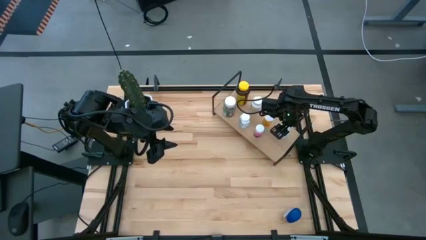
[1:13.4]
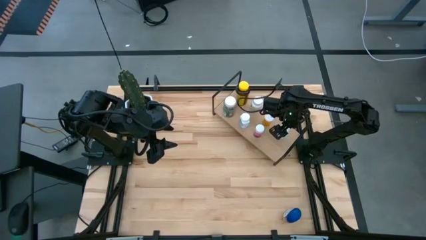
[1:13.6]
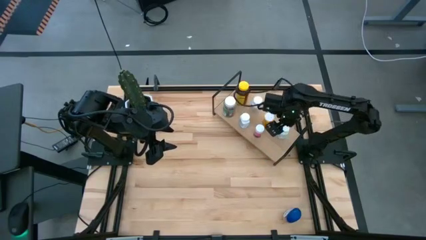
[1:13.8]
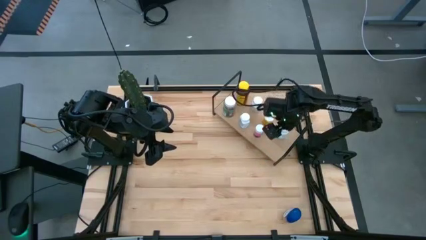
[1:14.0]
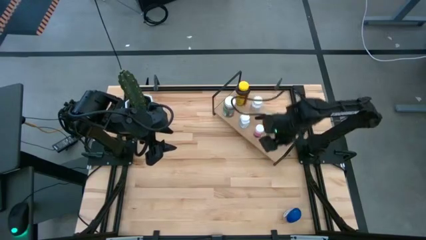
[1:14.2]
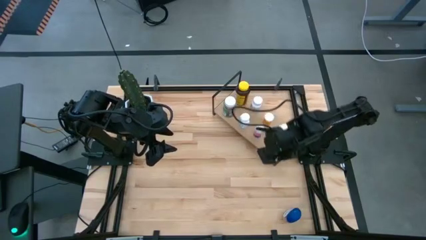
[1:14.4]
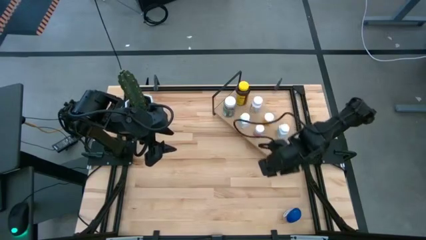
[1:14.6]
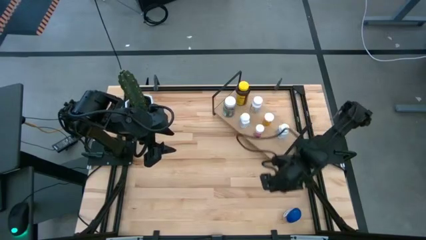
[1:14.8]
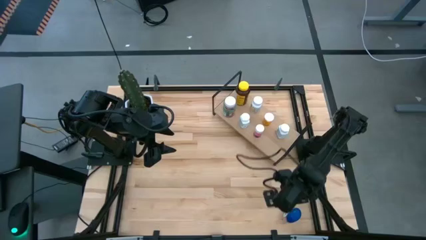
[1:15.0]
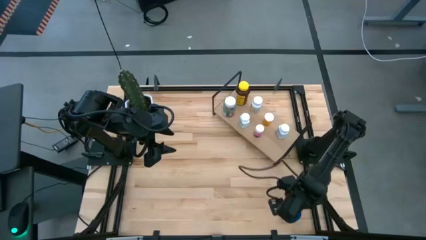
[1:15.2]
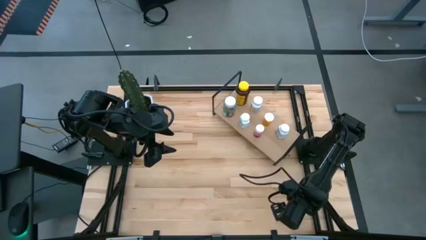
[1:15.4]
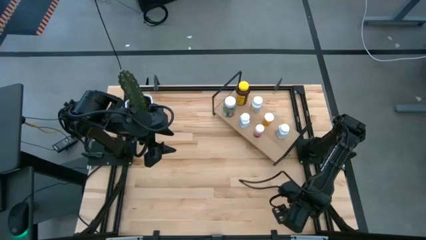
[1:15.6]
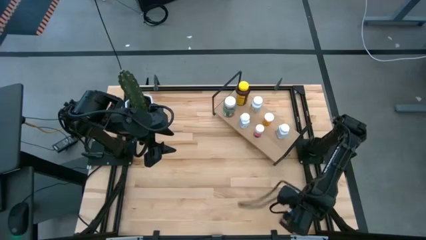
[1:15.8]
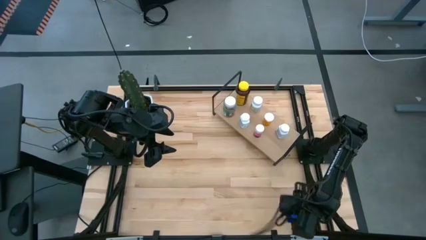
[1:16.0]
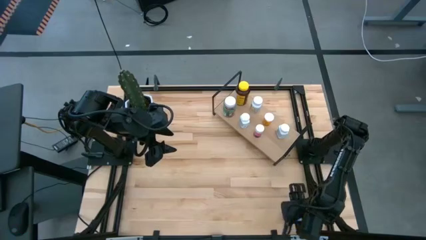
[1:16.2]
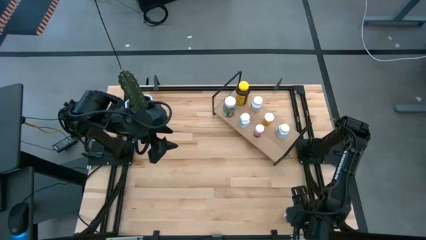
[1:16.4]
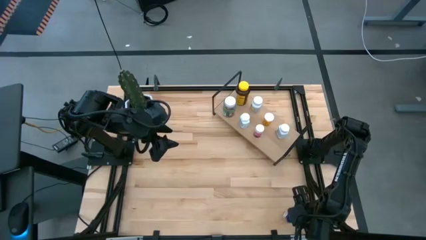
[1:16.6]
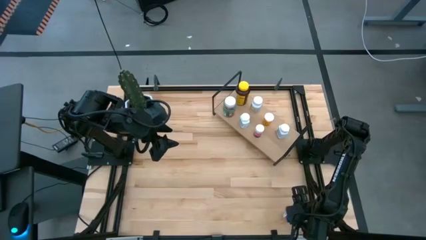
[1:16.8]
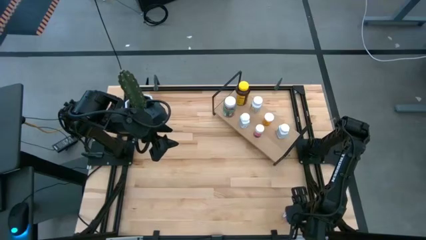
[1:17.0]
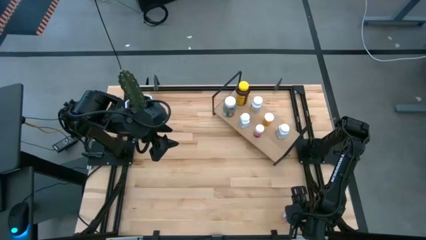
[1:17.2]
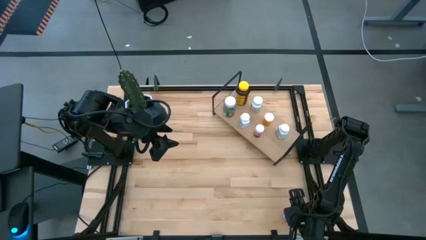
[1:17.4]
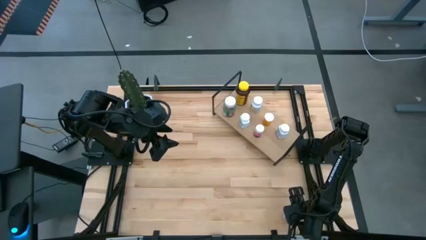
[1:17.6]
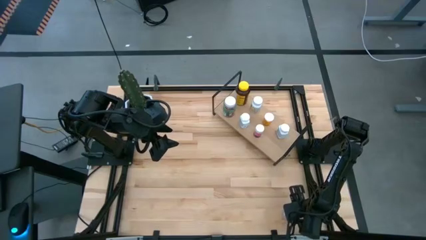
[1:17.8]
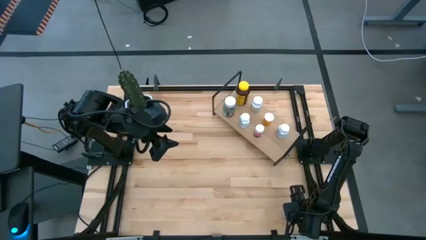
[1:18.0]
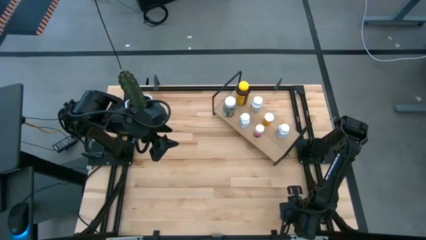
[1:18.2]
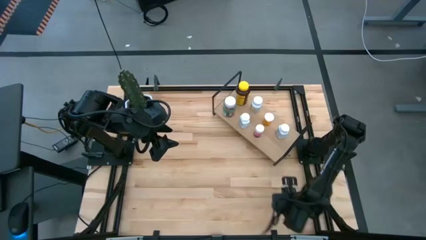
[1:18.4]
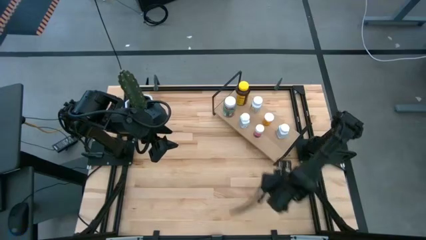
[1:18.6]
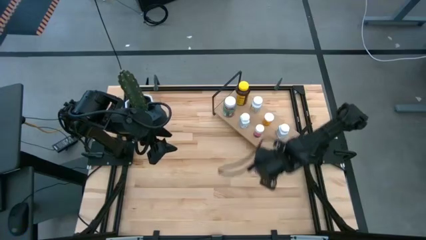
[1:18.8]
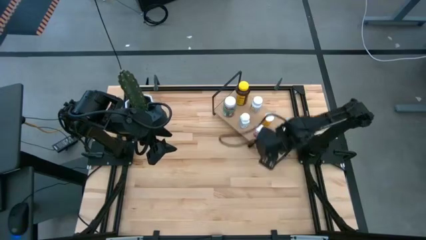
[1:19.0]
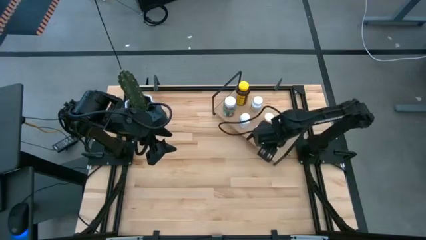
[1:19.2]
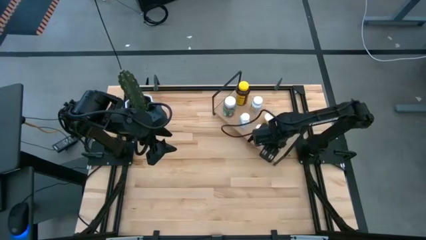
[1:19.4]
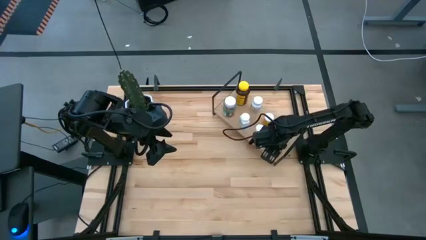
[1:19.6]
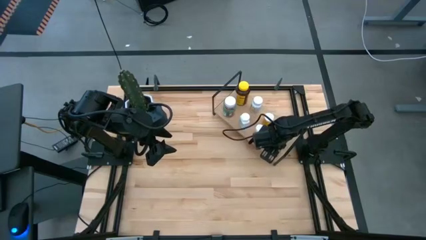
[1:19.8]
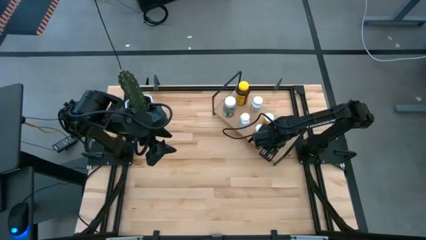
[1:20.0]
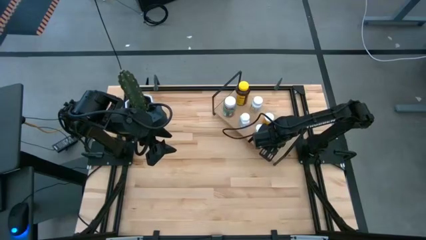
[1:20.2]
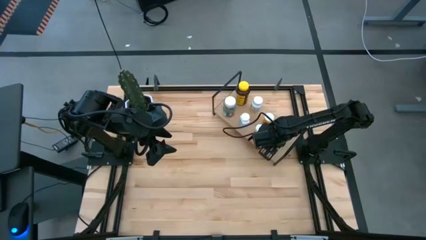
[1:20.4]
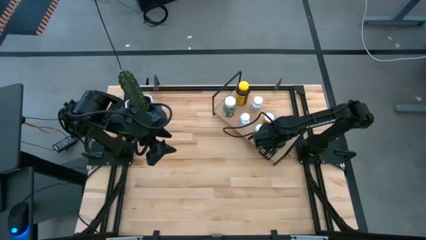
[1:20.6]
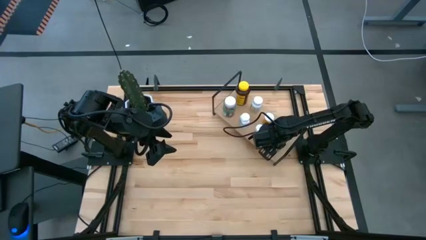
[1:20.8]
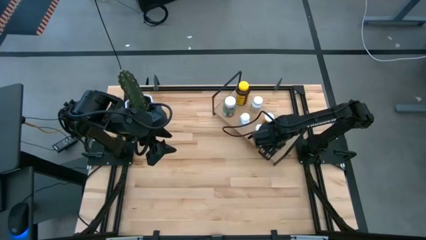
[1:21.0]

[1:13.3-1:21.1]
Task: Pick and place medicine bottles onto shelf by color
Put the blue medicine bottle on the shelf

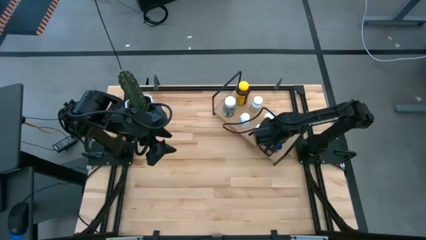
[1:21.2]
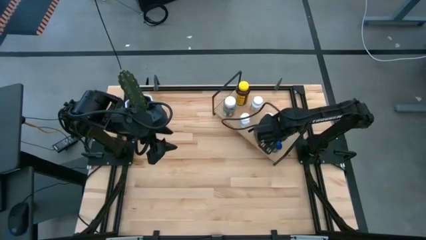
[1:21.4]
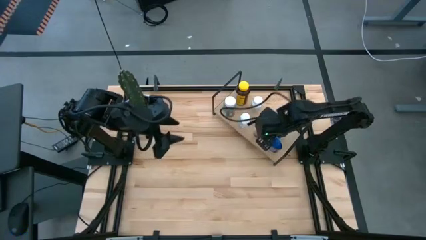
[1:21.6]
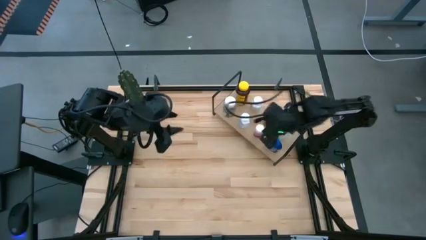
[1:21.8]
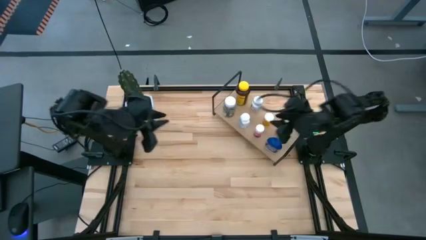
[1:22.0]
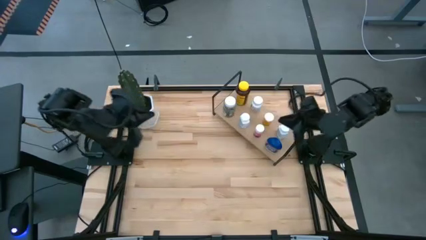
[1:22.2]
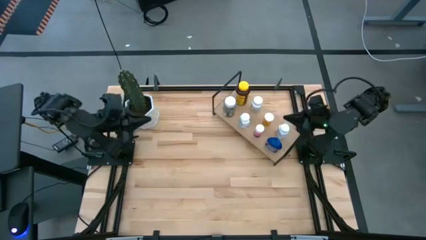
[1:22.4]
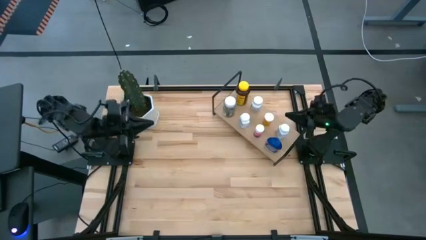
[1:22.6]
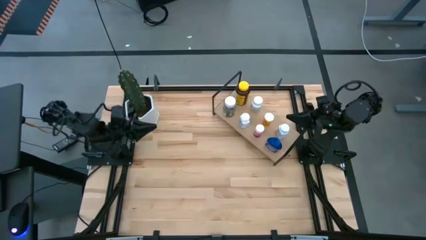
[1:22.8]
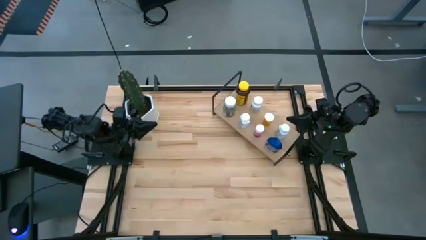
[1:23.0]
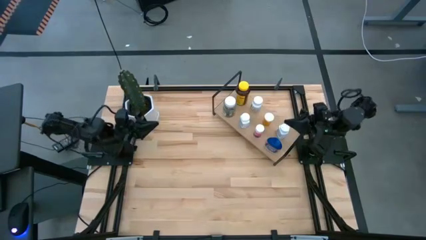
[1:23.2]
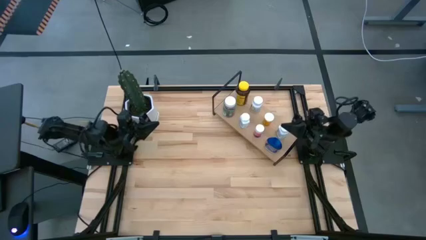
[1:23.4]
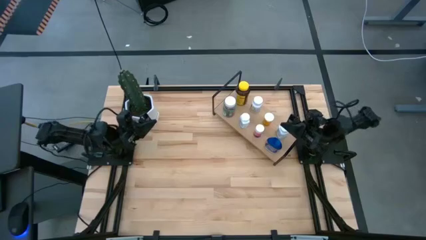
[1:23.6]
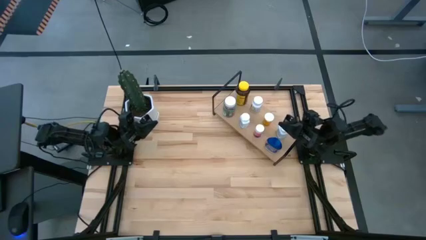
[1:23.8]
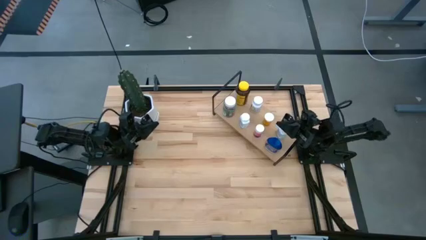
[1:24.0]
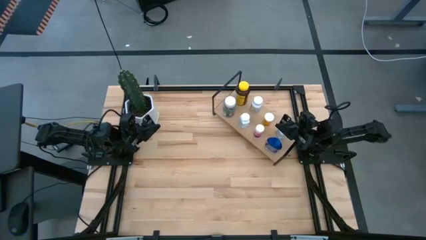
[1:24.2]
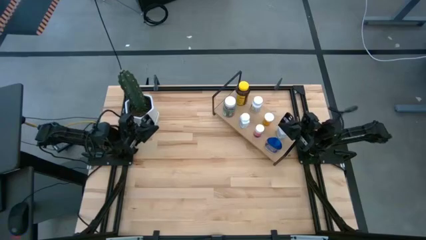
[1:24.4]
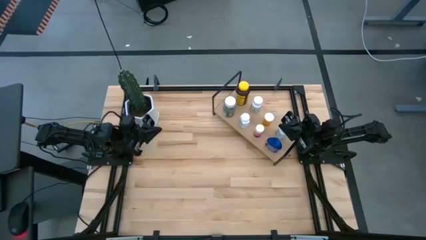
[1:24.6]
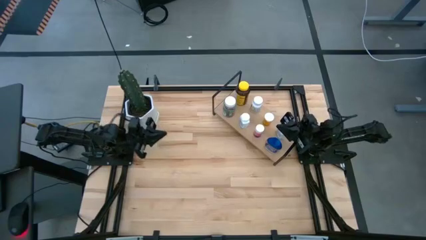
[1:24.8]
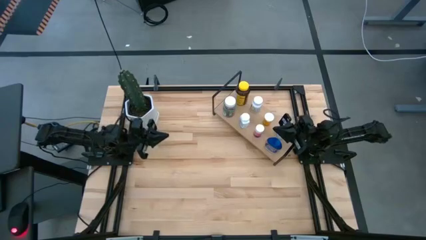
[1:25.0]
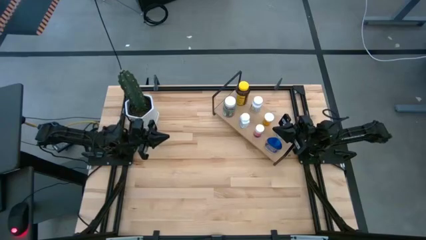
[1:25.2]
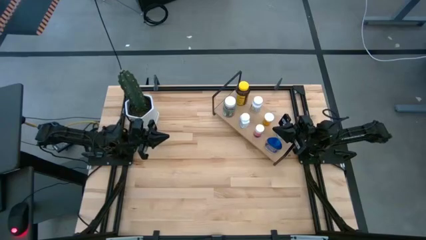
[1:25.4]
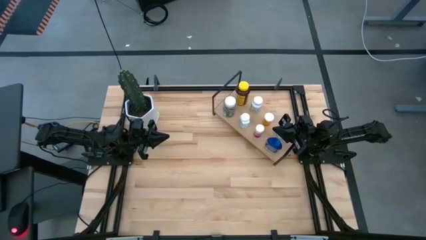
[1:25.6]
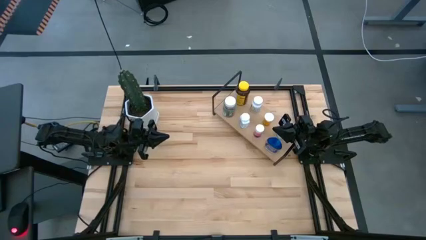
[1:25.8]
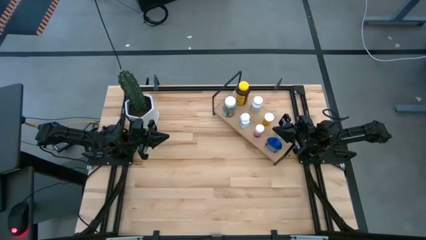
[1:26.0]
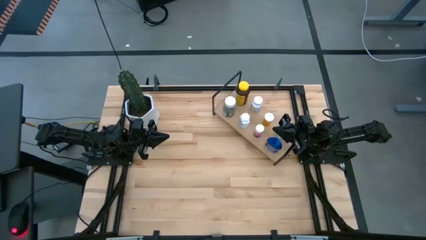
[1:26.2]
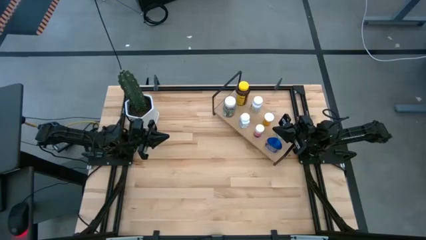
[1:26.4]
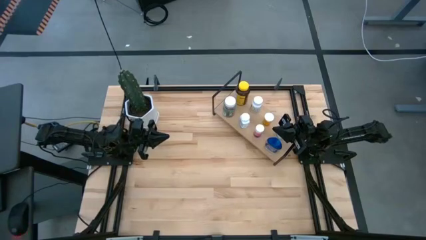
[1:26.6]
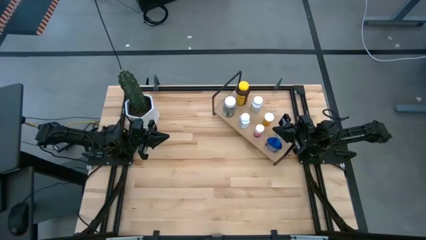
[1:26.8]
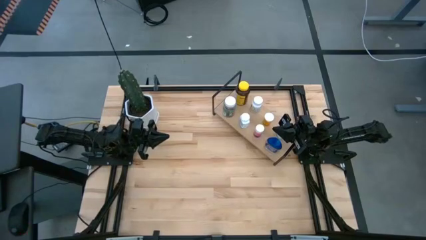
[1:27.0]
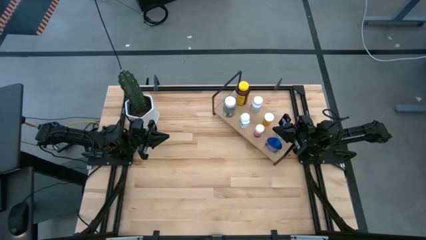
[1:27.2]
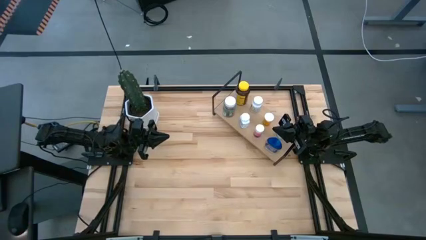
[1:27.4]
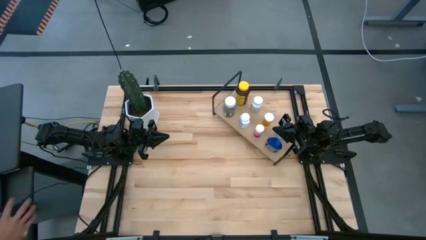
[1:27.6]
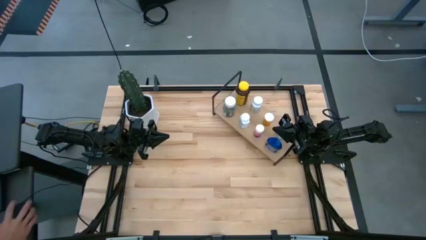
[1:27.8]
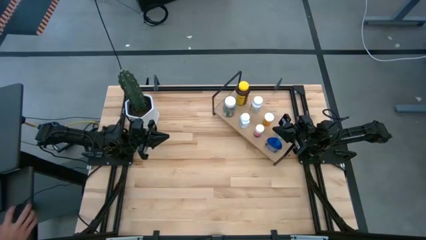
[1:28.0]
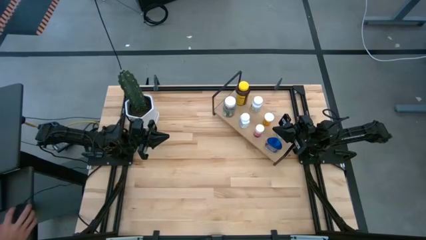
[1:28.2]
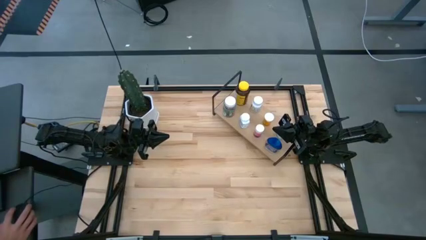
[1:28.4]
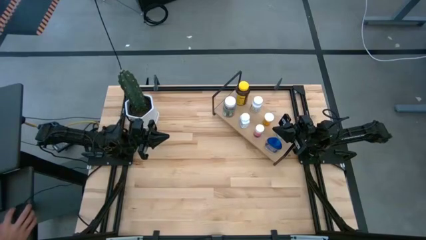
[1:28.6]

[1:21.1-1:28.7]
Return to Home Position

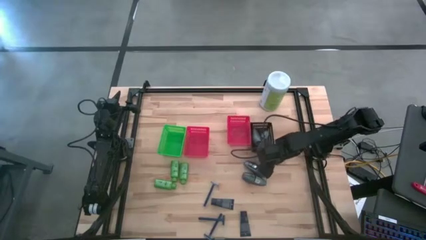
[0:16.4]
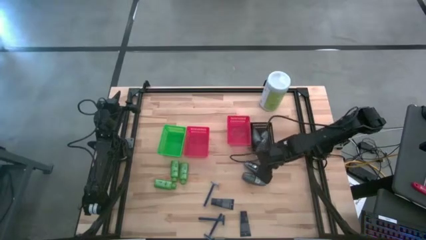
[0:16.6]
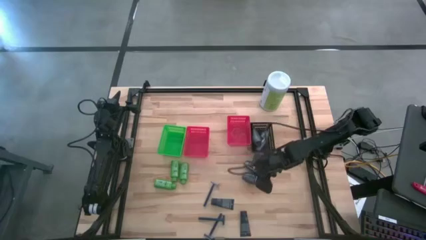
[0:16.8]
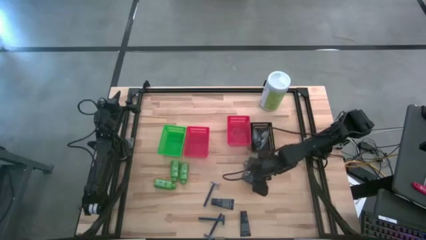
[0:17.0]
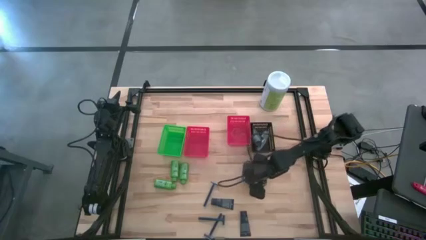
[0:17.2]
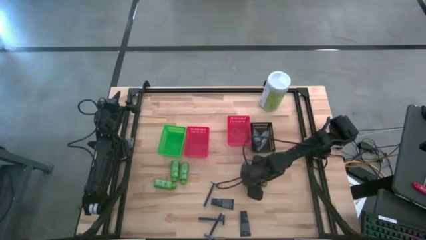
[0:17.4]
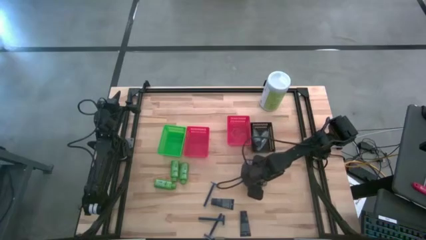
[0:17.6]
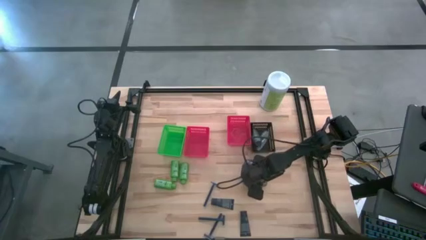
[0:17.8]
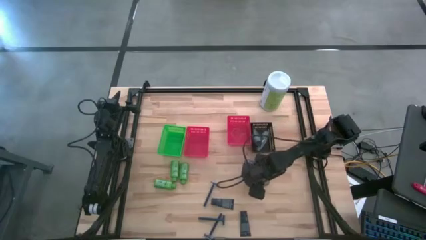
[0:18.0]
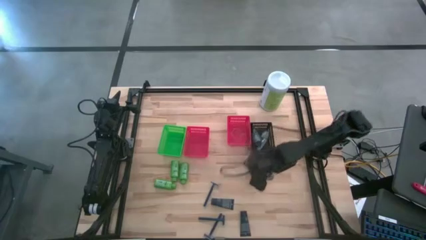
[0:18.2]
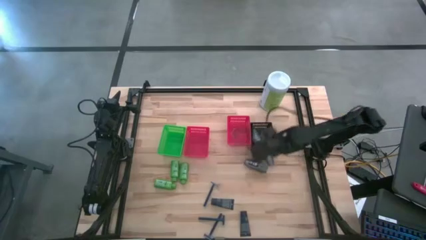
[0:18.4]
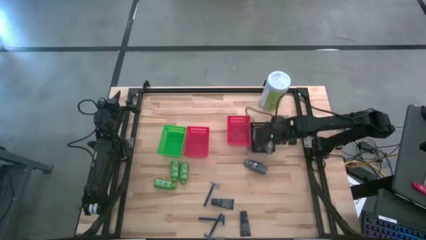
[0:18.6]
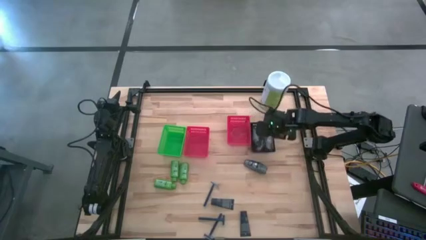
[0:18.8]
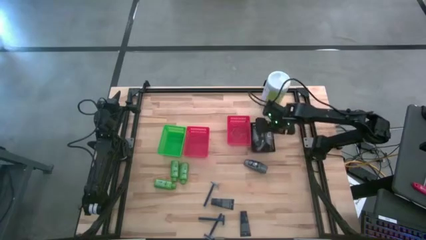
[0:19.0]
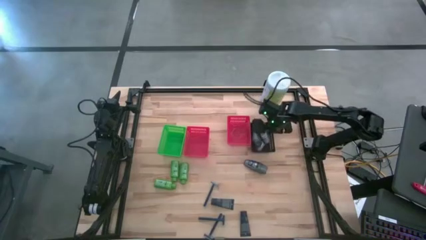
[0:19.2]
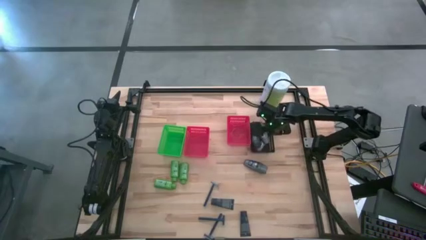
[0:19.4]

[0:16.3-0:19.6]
Task: Pick & Place Travel size toiletries
Put the gray deodorant into the black basket
